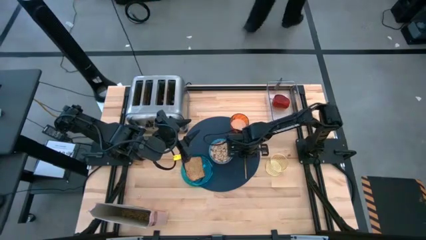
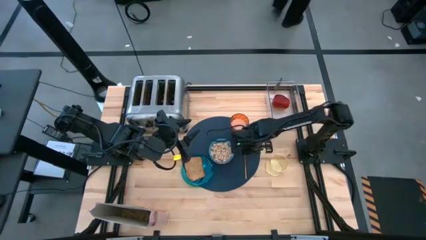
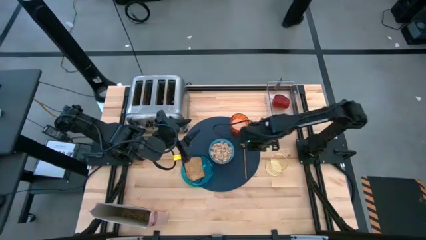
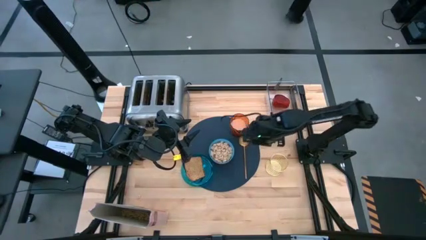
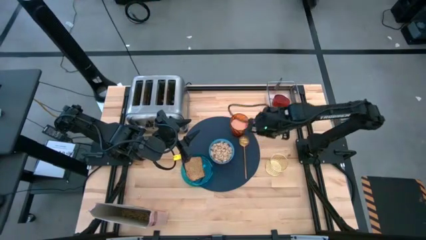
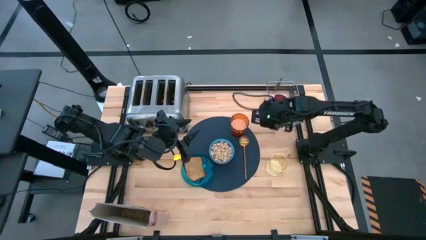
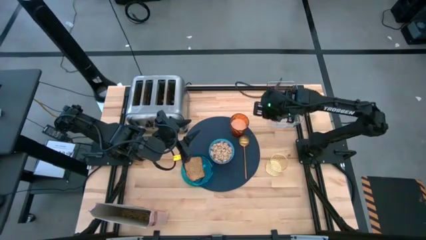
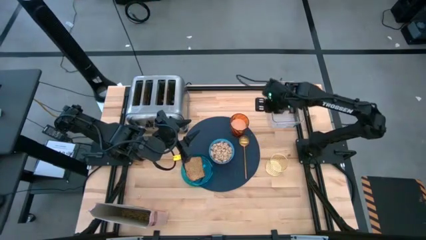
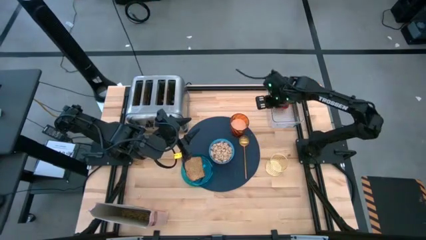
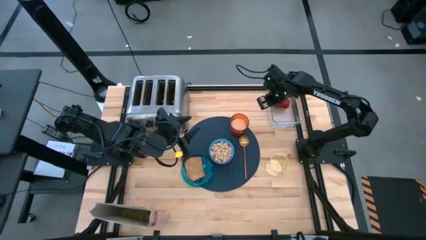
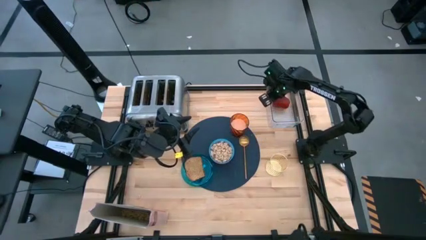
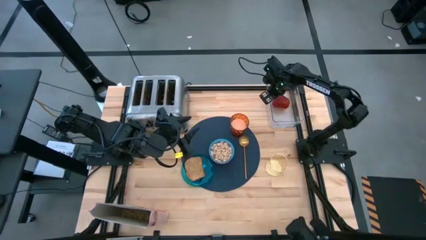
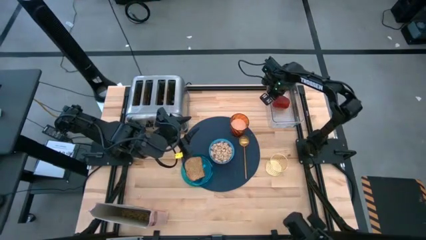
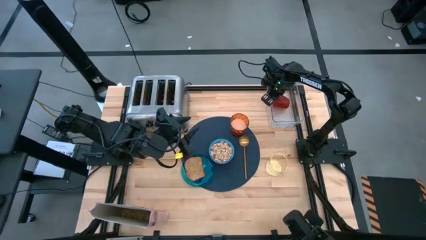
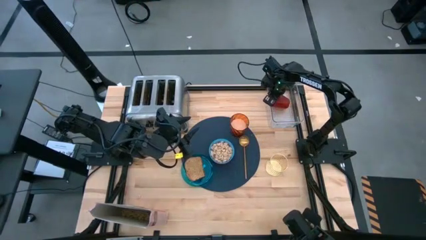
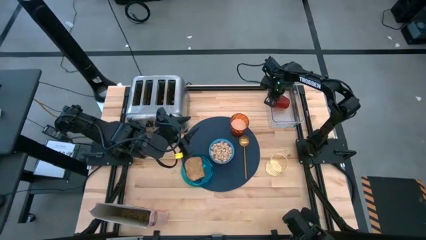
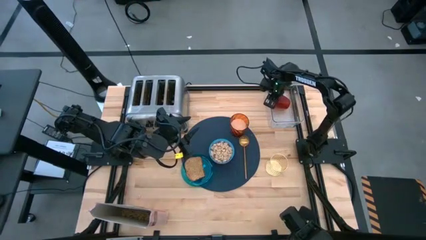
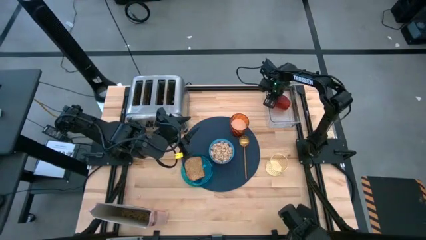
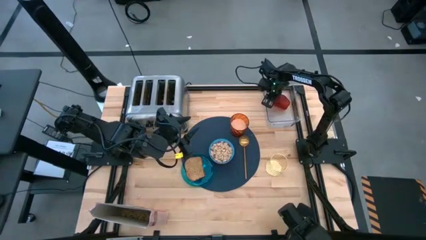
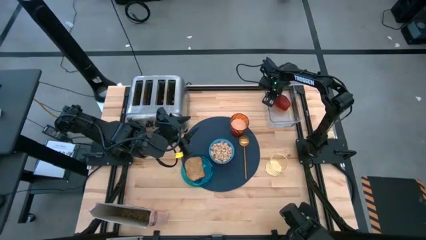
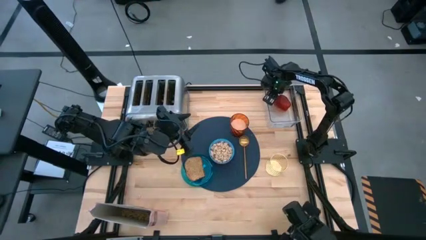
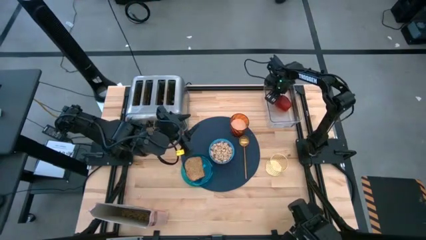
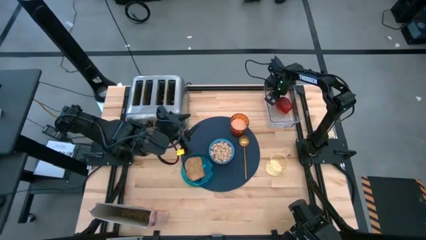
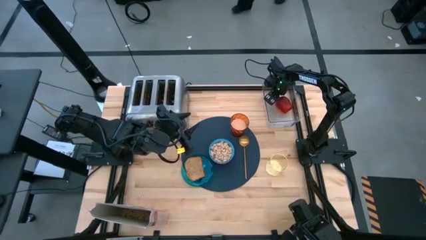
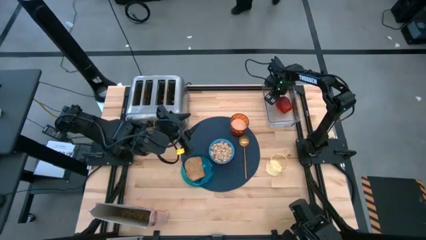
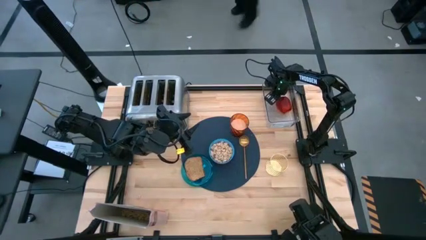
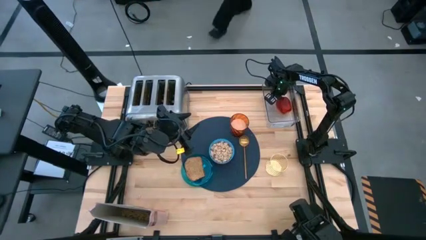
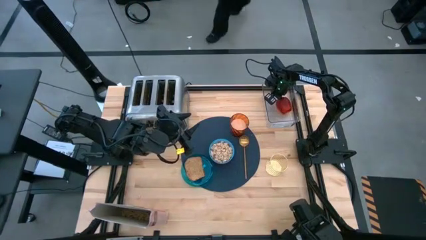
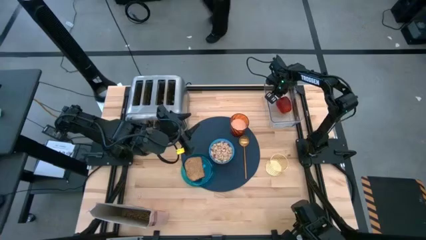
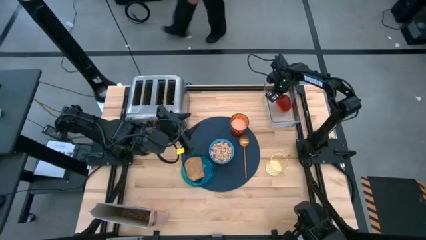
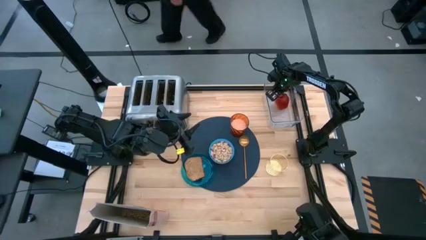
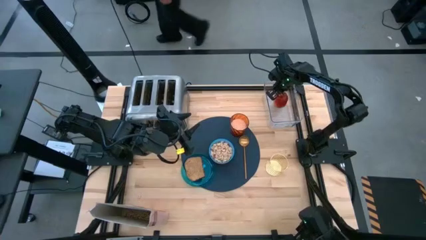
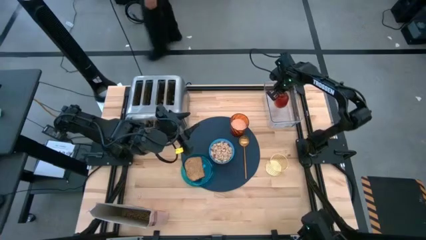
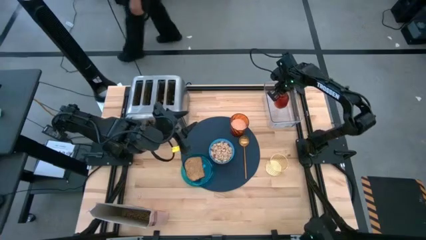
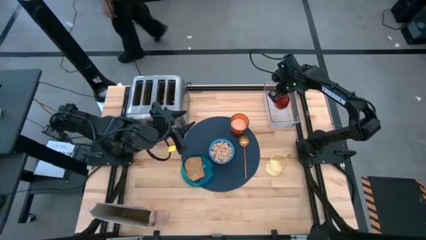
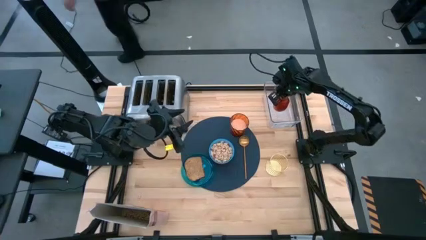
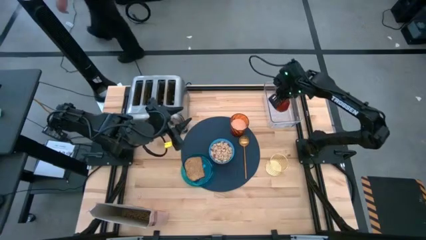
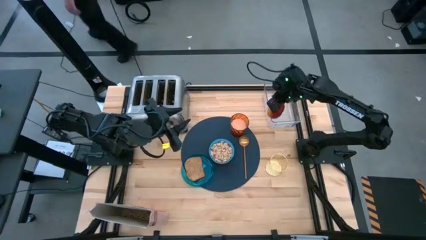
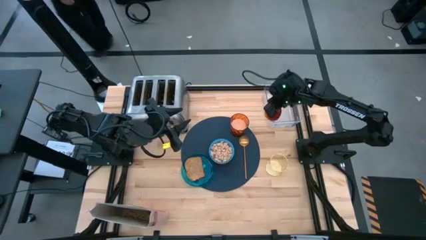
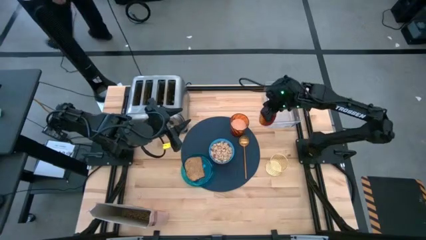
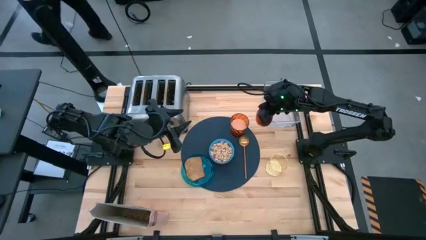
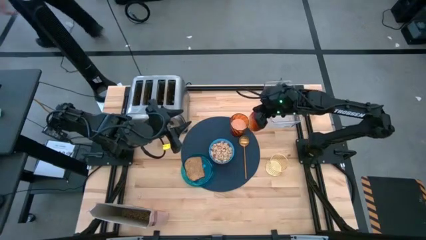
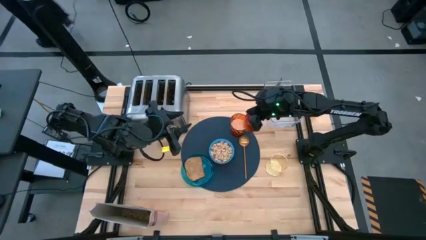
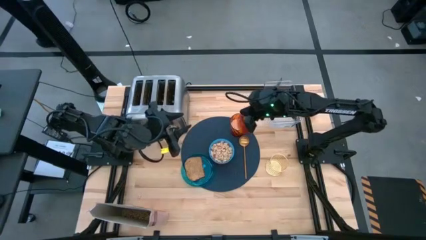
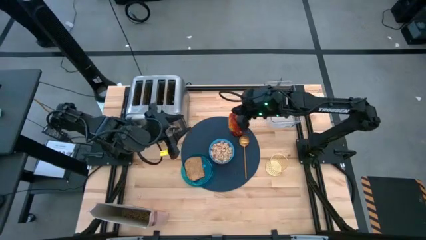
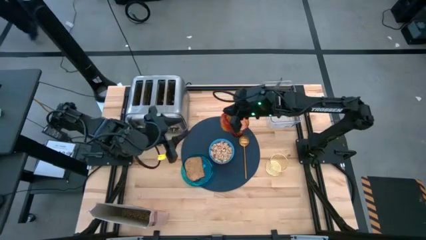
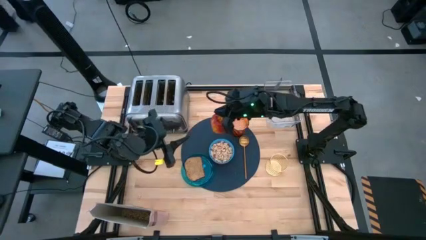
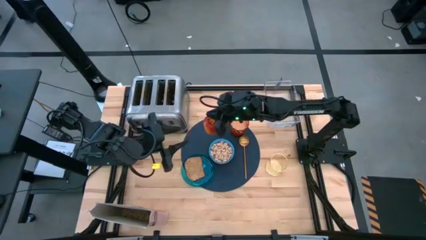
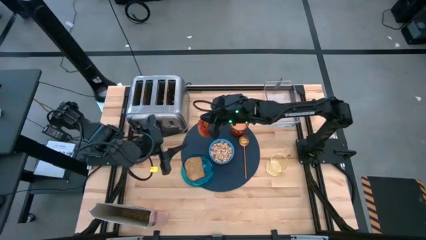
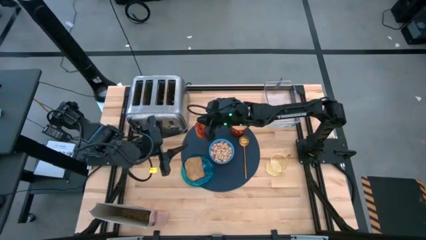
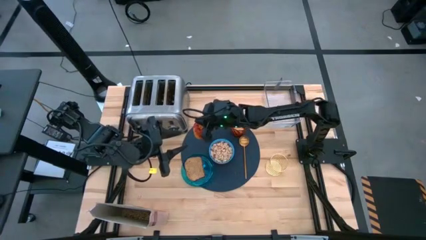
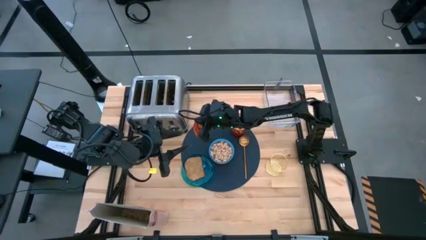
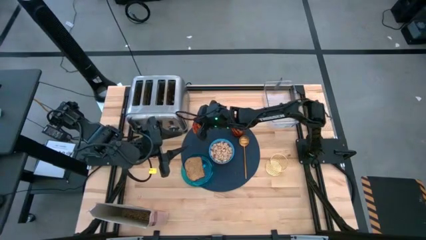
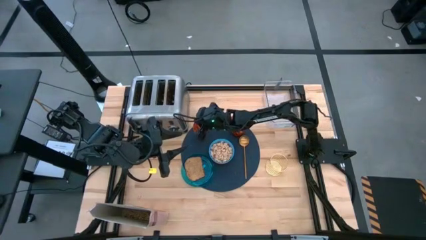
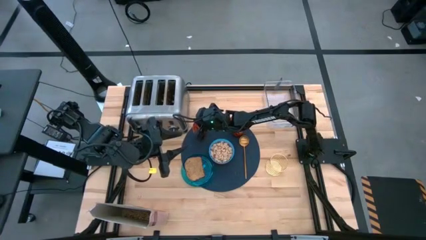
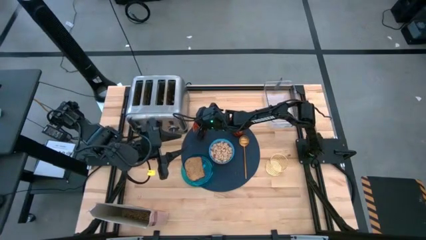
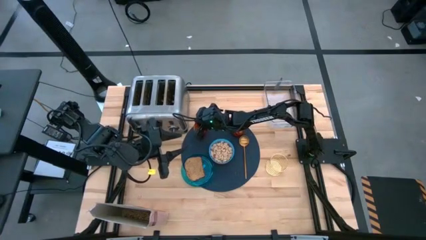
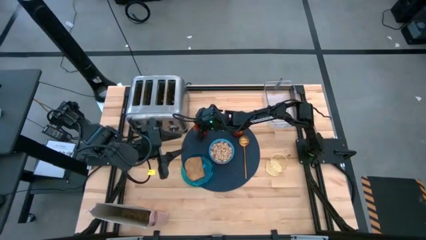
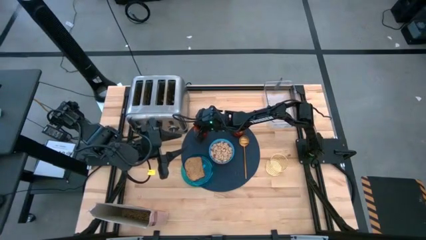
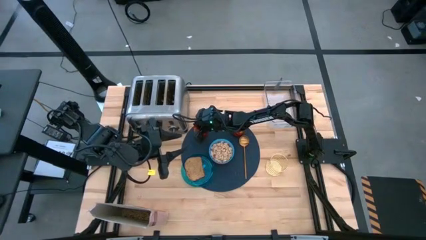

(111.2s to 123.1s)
Task: Arrange a breakfast setting
Put the apple on the blue table mat to the top left of the blue bowl

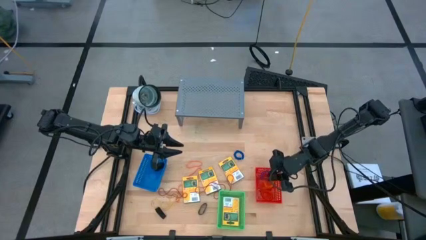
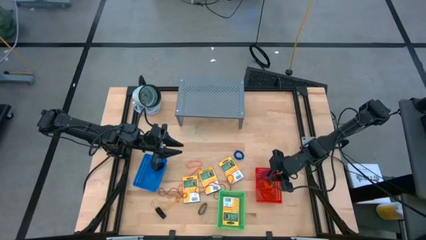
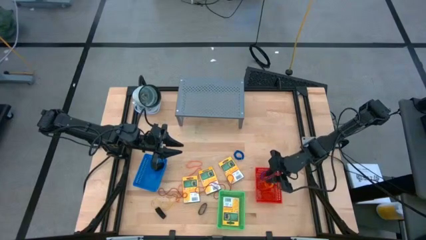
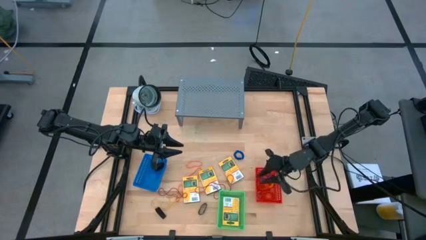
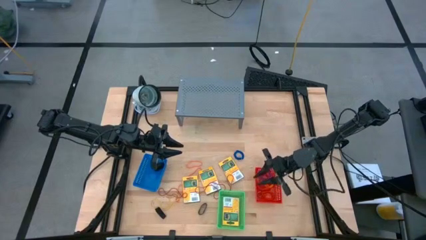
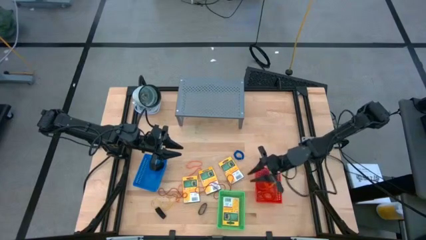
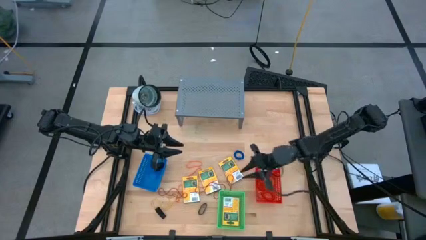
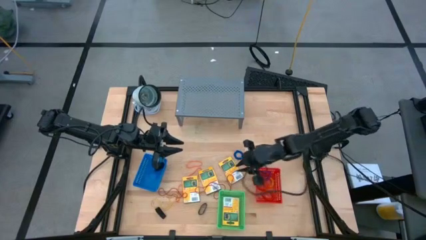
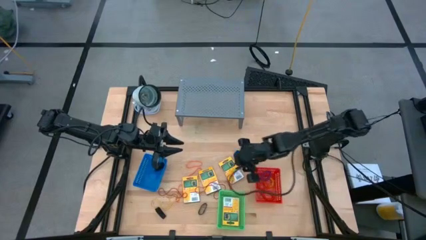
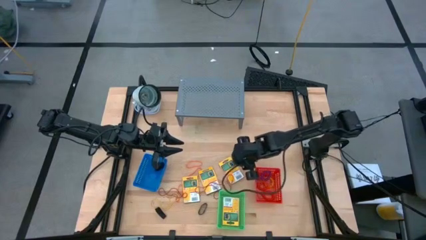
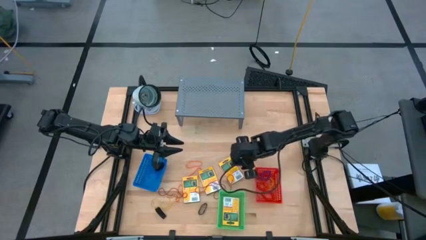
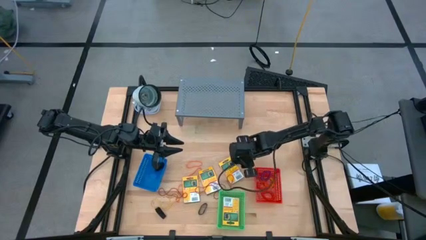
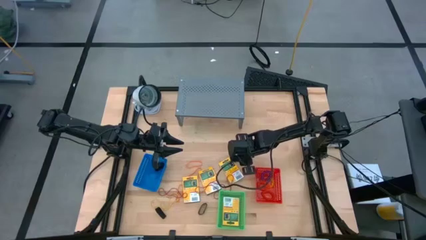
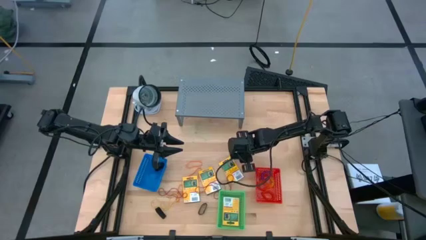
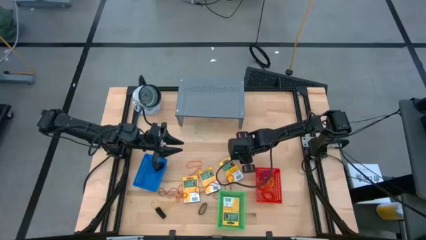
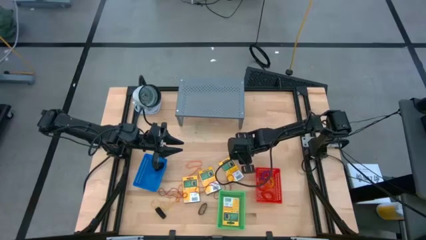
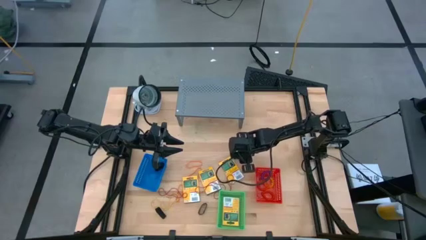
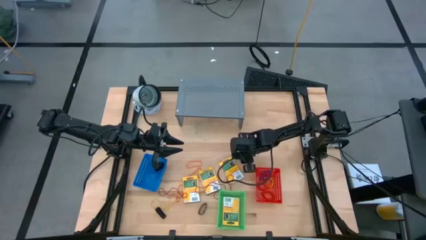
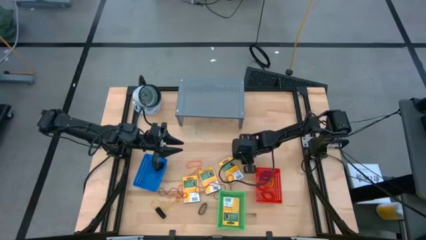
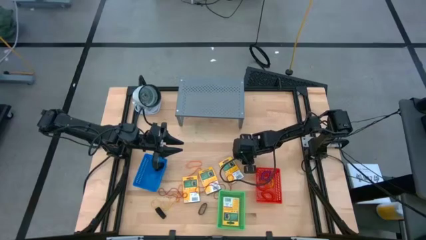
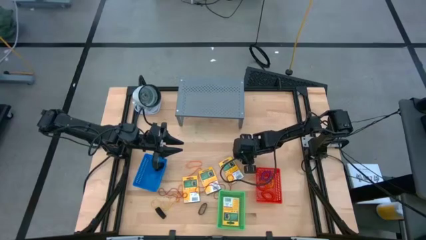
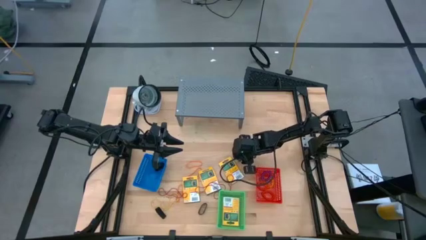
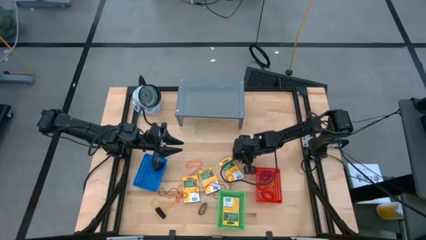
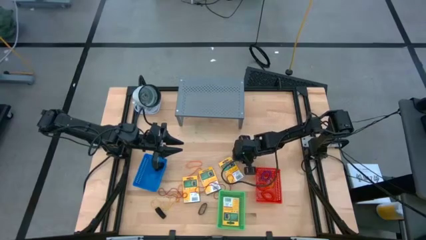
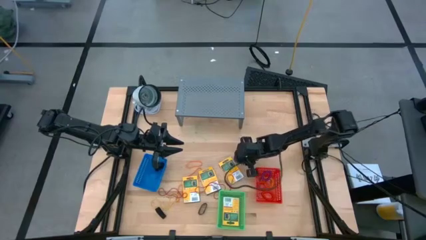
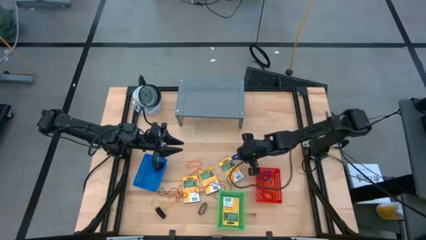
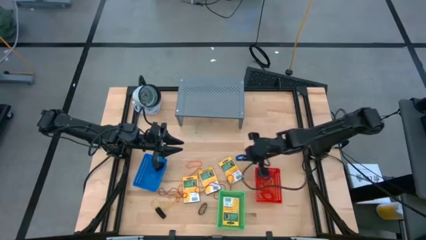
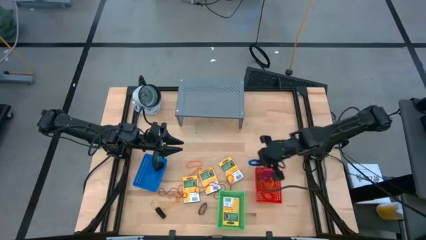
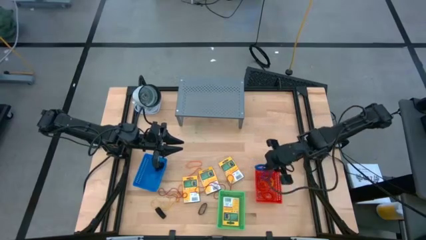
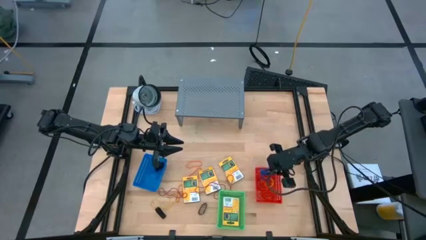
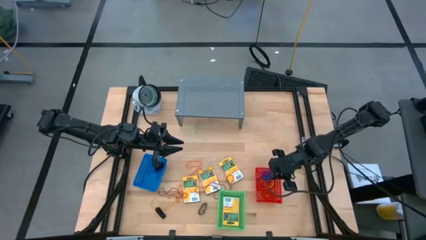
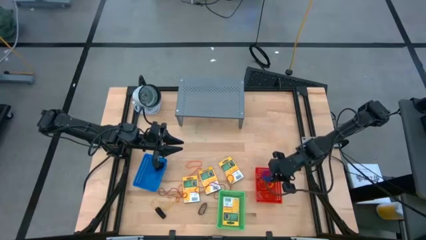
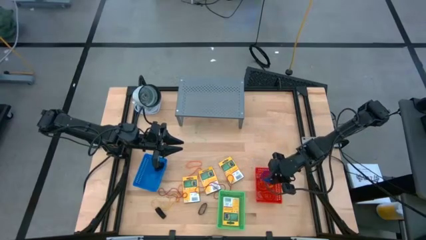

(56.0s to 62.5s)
Task: Pick & Place Office Desk Supplies
Put the blue spring keychain into the red bin
